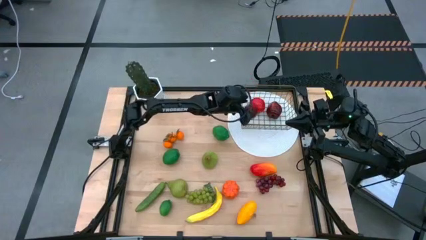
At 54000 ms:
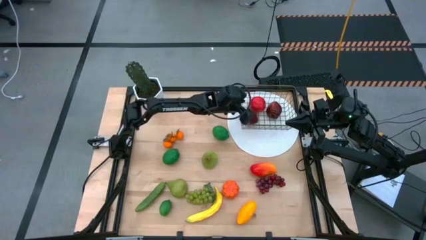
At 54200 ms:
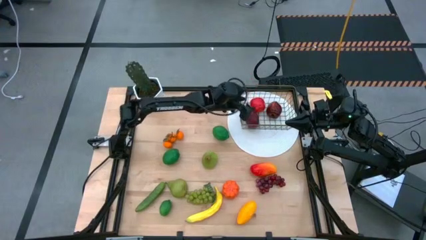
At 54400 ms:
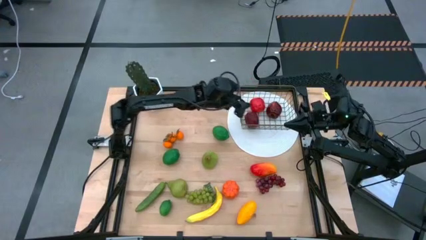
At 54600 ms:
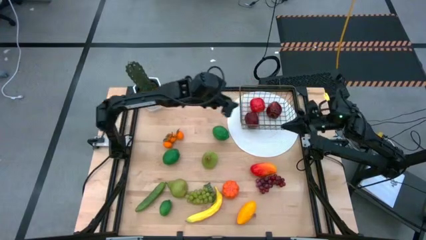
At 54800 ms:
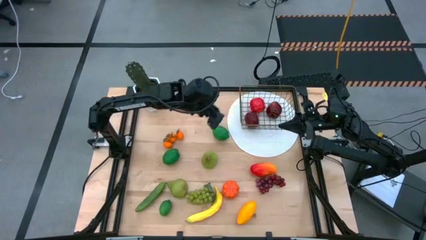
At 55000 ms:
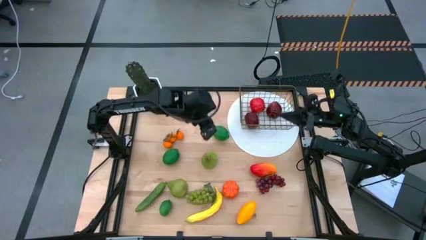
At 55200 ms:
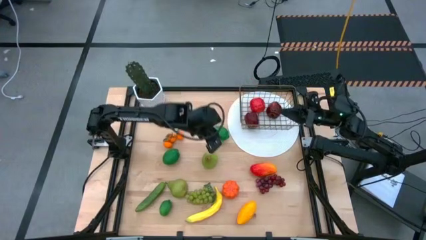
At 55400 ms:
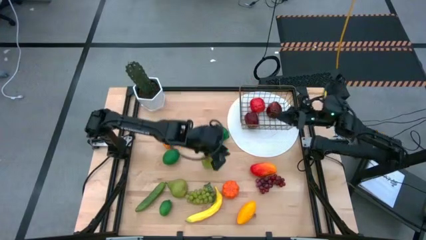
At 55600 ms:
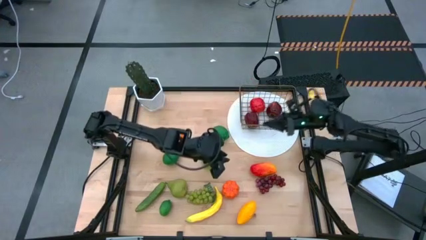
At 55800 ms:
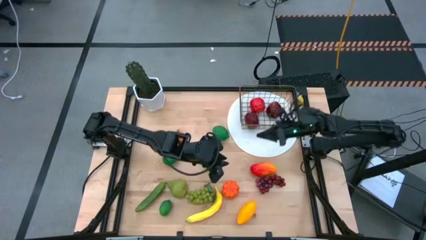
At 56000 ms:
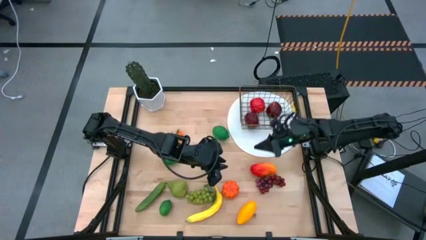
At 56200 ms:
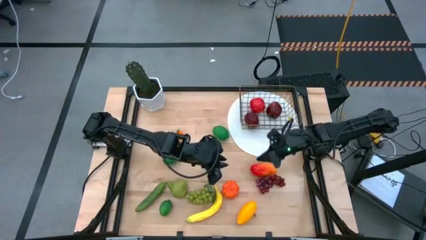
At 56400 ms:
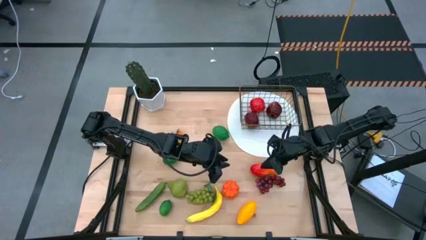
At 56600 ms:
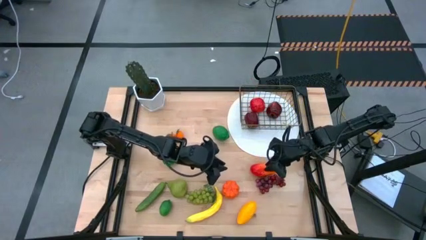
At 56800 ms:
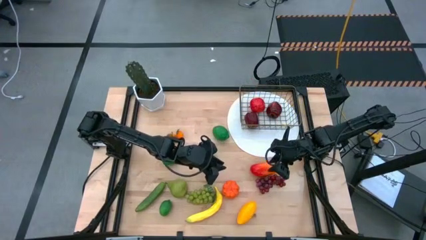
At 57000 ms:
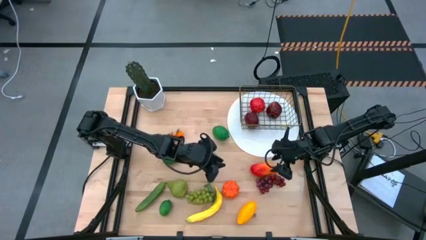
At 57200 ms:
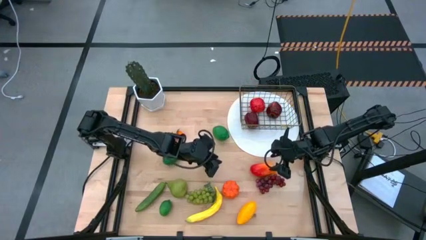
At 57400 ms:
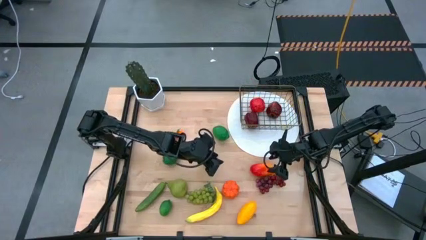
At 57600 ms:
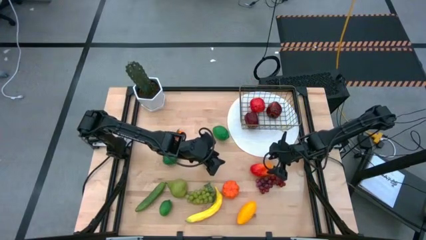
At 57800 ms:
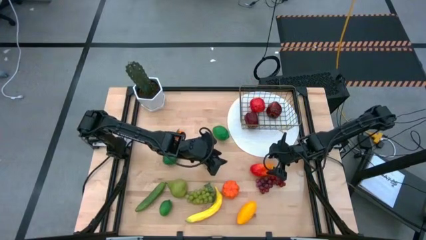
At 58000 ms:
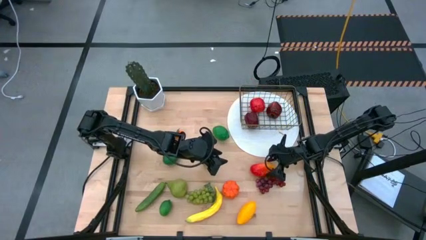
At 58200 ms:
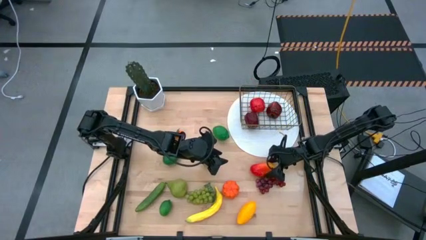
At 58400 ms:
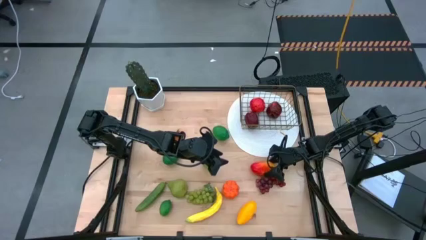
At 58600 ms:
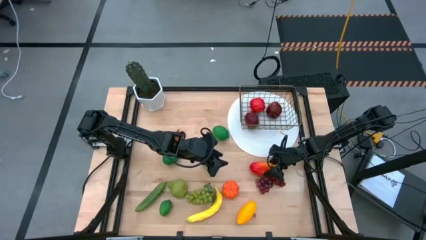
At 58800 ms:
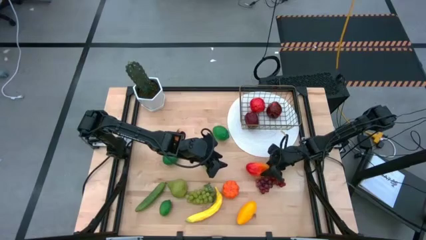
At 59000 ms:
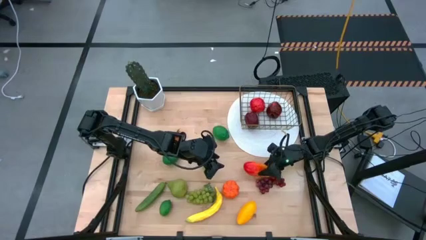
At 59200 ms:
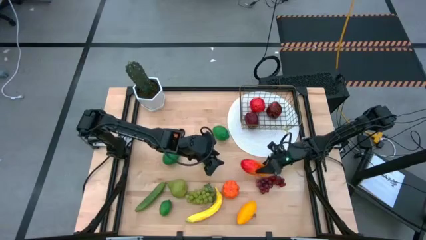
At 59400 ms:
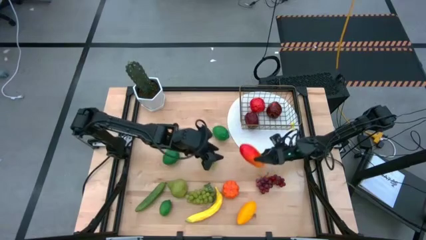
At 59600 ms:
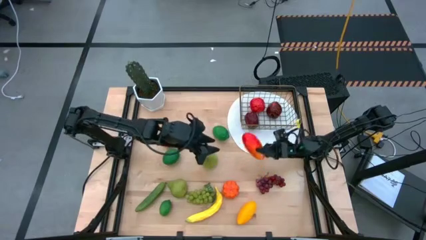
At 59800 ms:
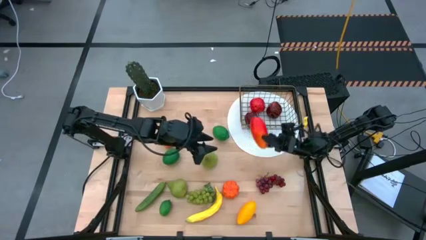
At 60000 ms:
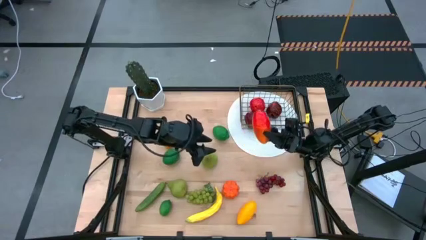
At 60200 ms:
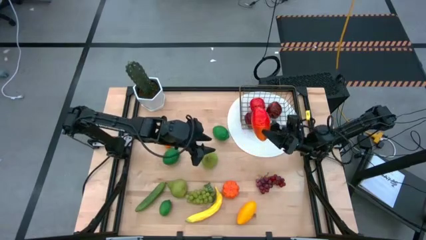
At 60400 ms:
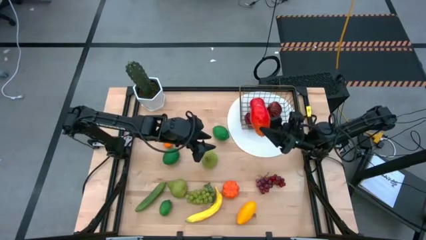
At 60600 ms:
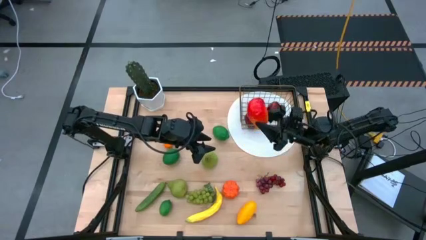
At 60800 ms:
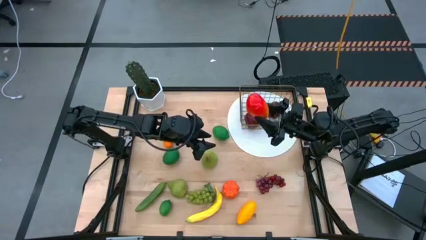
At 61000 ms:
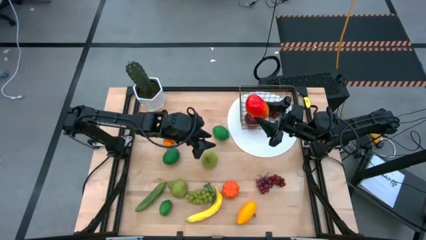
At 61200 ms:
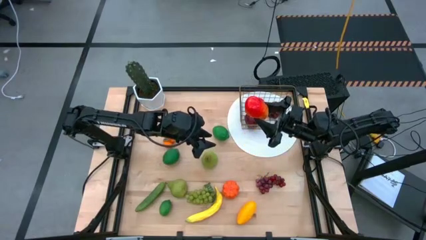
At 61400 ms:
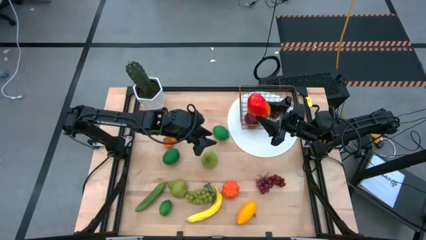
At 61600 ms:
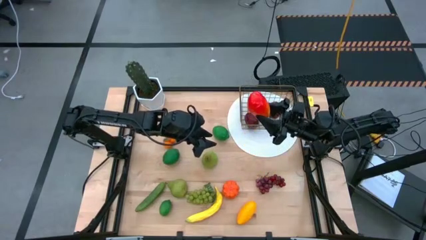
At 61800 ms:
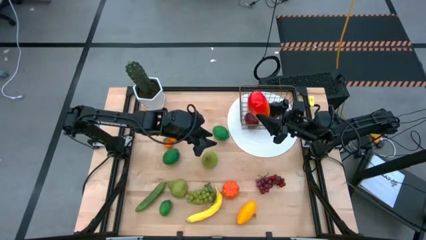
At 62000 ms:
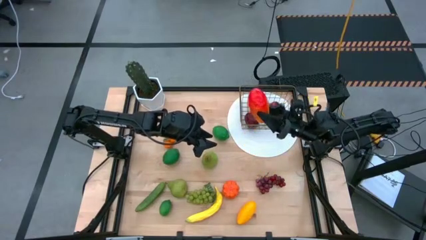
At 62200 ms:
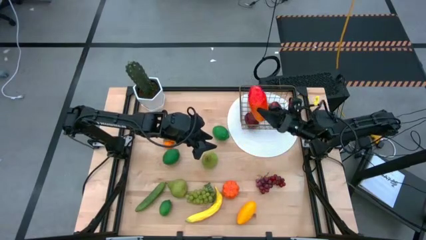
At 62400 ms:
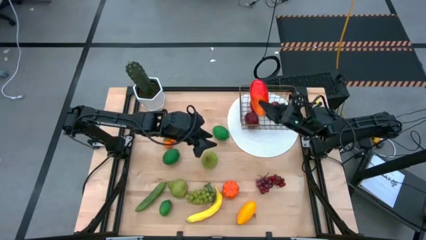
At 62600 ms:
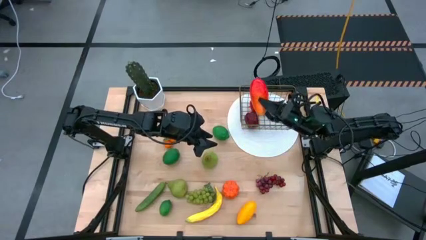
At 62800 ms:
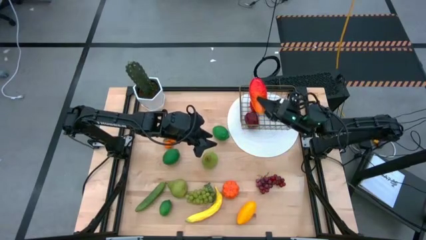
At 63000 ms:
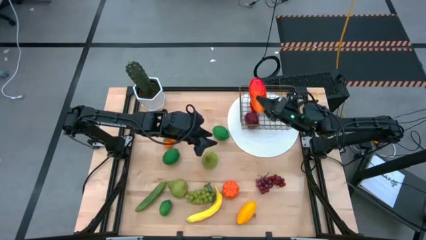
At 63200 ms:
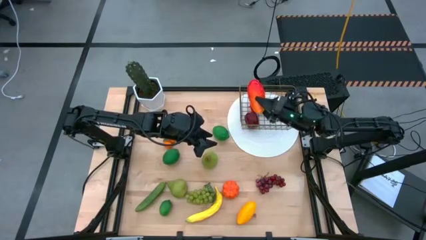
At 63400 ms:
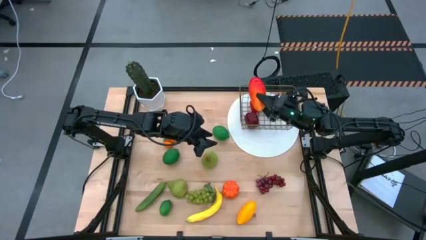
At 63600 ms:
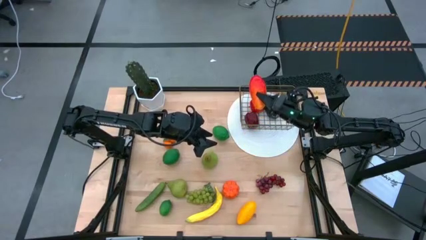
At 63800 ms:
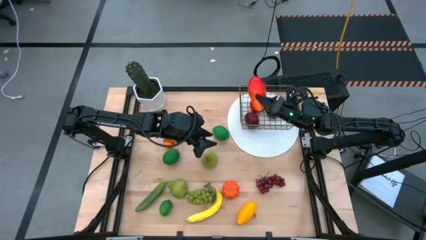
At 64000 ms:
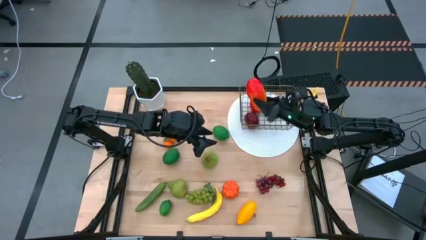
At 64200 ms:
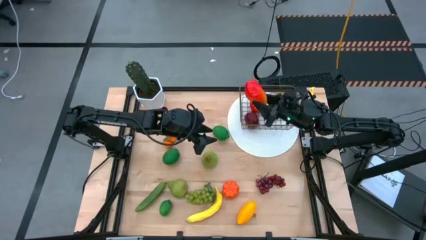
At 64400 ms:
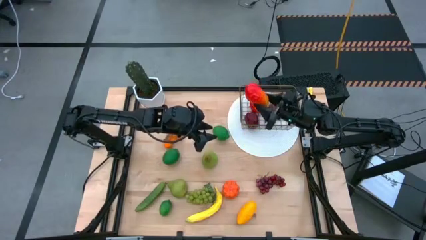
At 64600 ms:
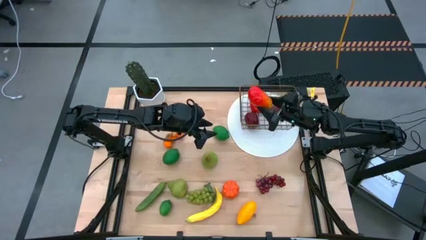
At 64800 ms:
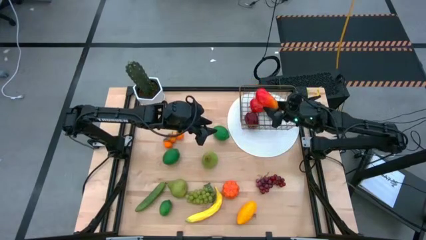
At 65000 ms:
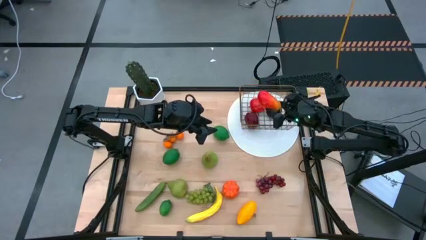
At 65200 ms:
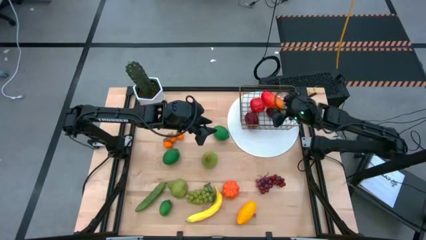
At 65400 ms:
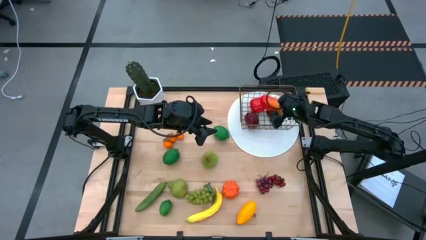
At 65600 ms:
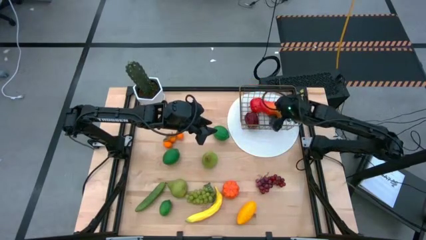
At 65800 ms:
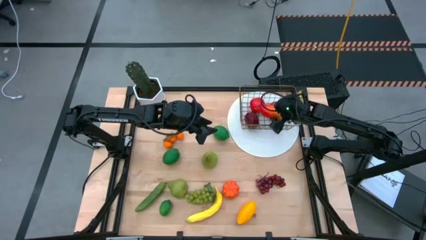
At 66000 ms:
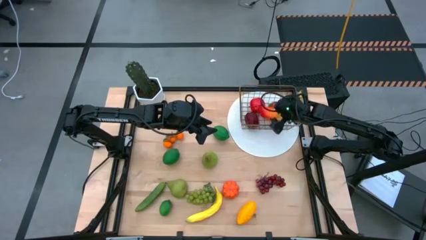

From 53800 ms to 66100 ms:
Task: Build produce basket
Put the red mango into the gold wire basket

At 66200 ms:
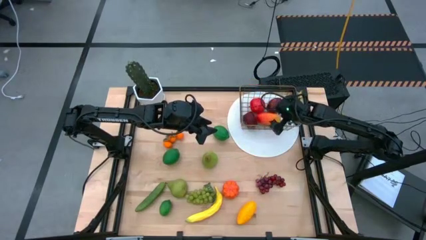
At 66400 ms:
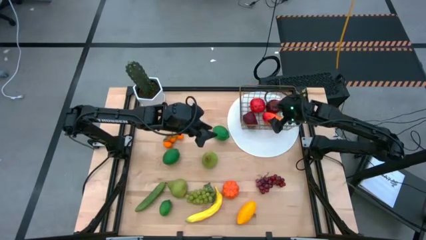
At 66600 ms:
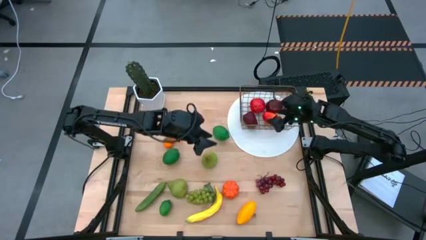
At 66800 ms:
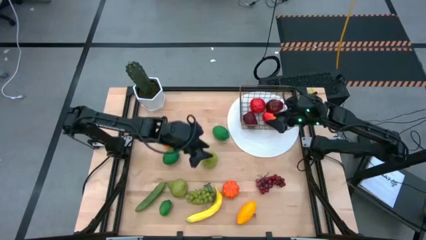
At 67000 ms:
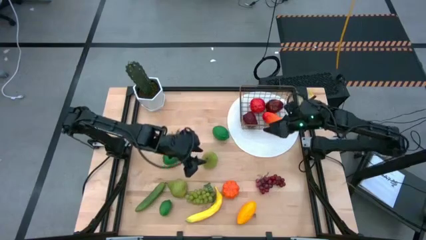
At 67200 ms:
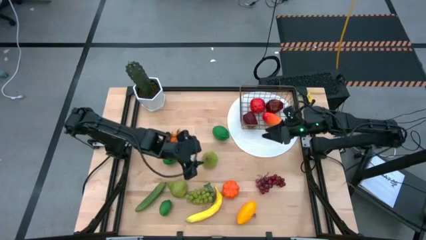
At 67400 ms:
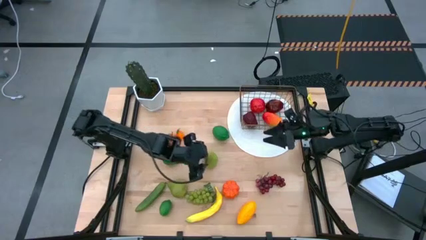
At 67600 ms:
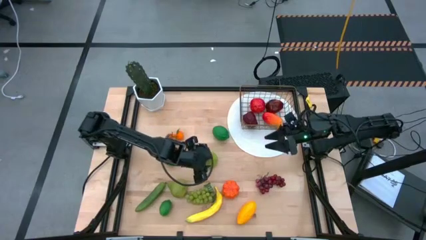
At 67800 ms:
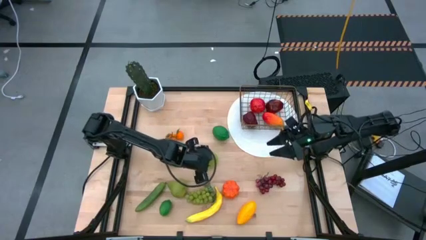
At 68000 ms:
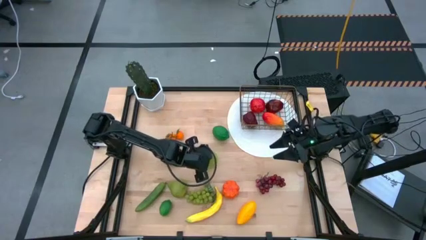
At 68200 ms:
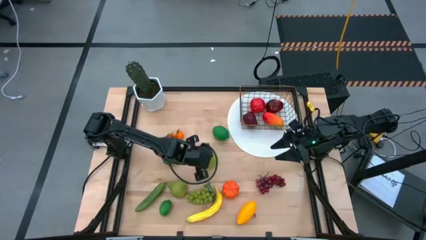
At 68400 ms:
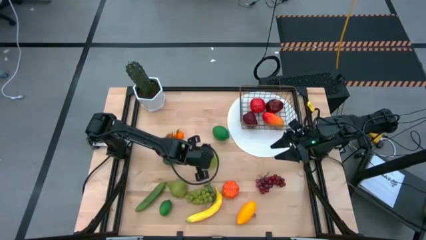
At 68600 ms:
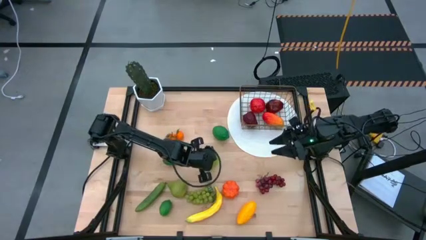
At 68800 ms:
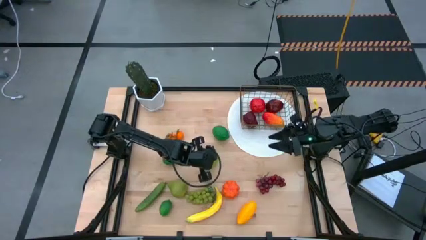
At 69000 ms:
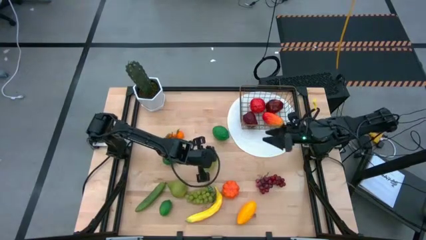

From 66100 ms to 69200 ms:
Put the top green pear into the gold wire basket
